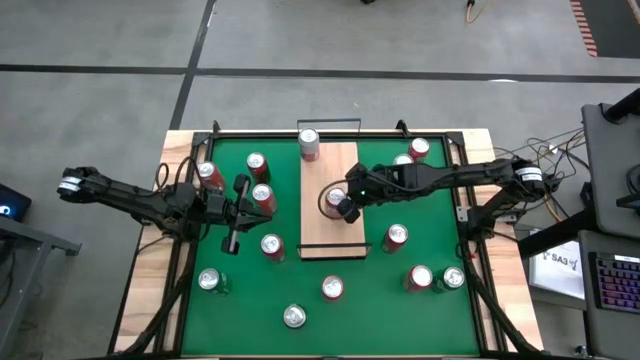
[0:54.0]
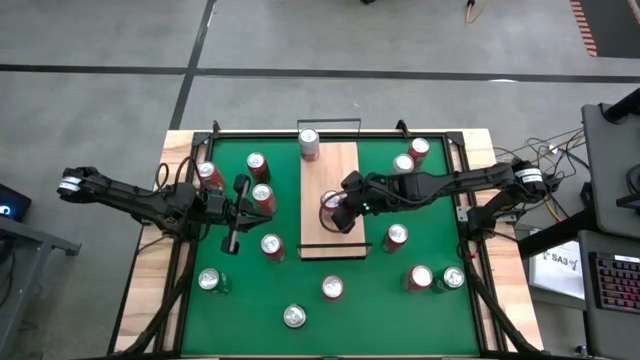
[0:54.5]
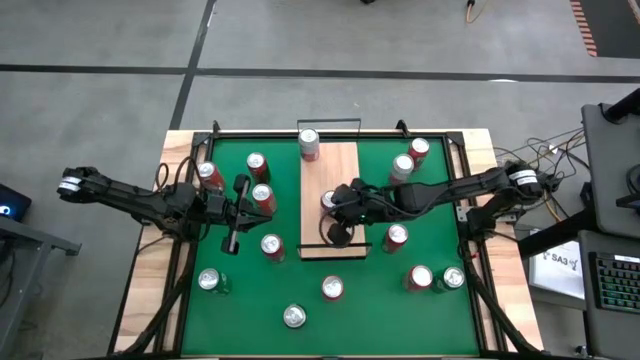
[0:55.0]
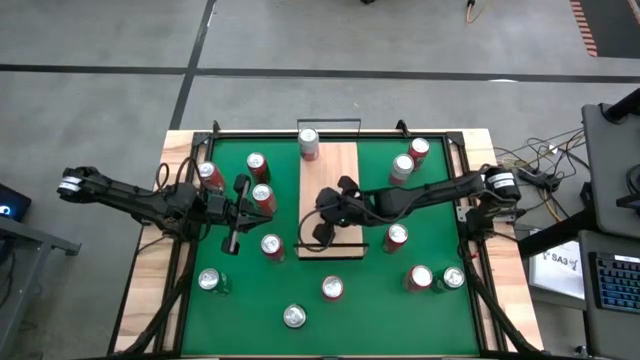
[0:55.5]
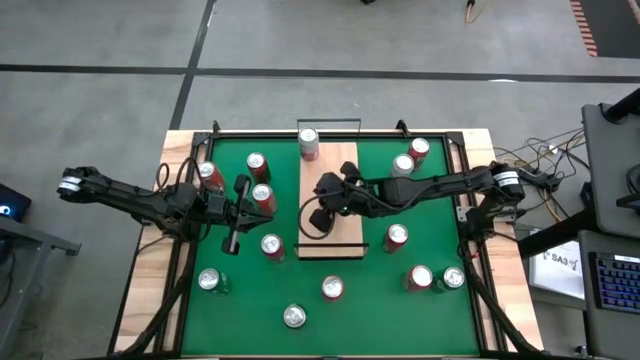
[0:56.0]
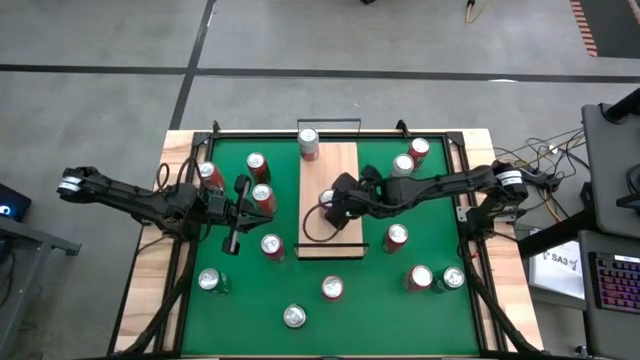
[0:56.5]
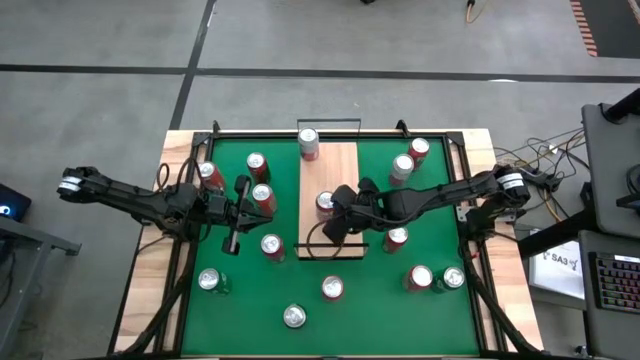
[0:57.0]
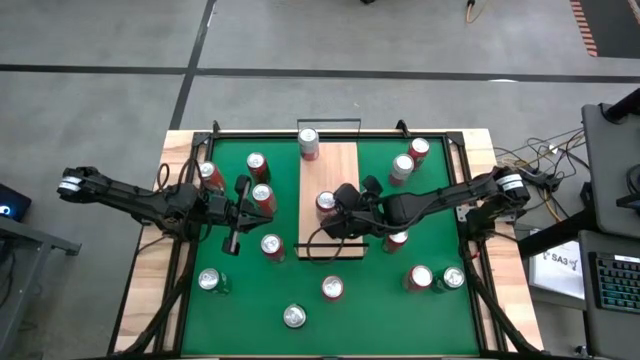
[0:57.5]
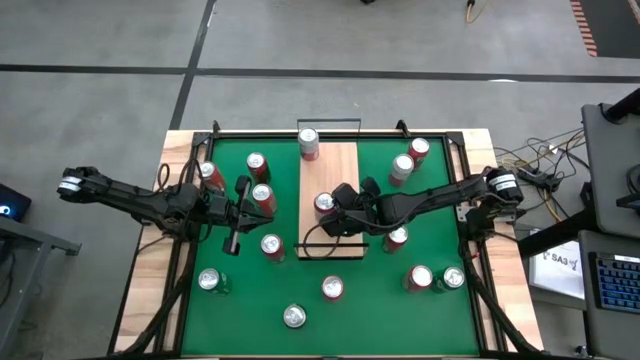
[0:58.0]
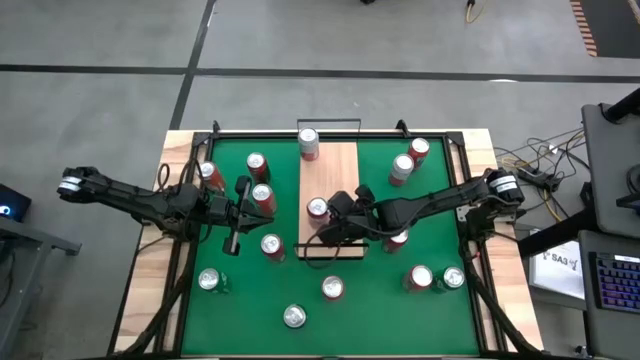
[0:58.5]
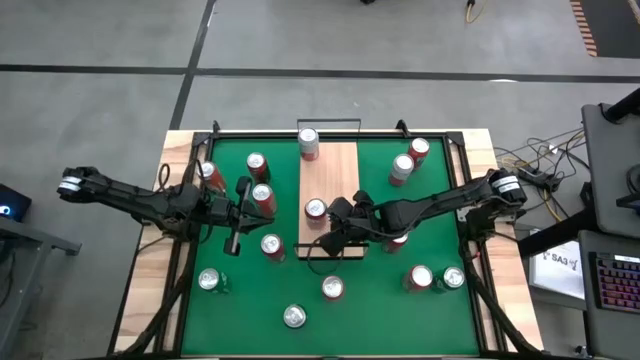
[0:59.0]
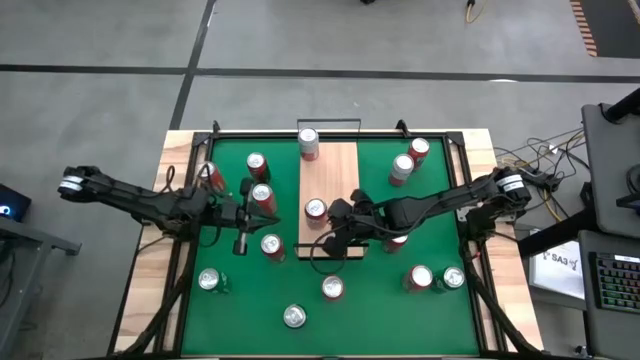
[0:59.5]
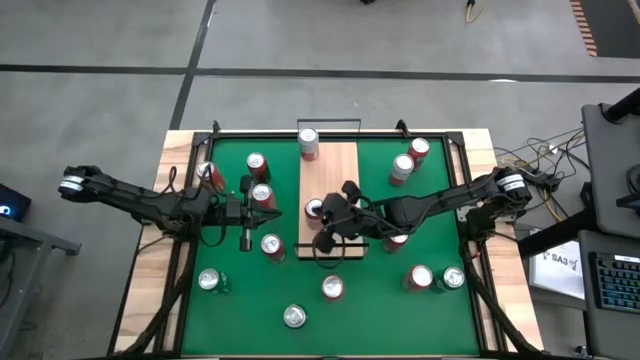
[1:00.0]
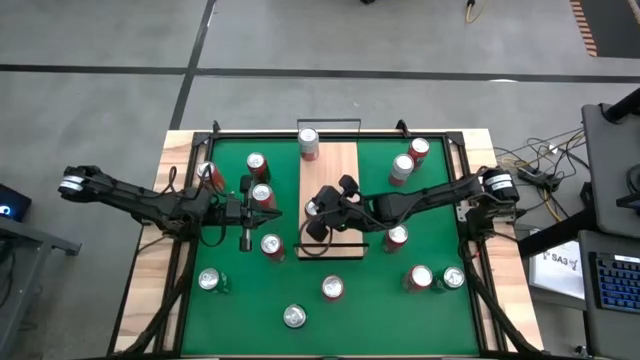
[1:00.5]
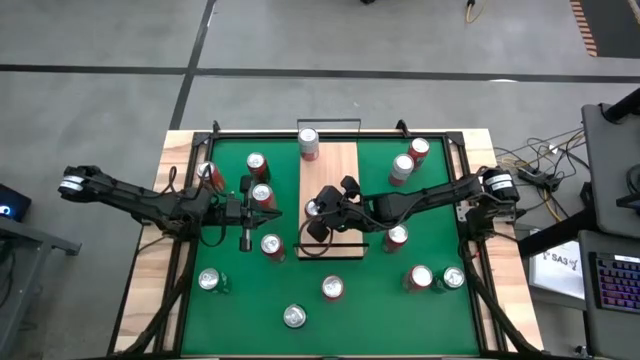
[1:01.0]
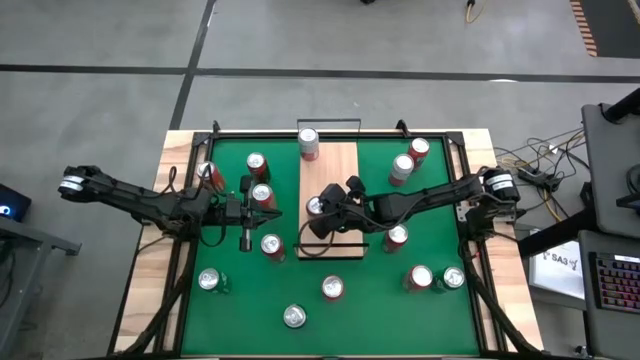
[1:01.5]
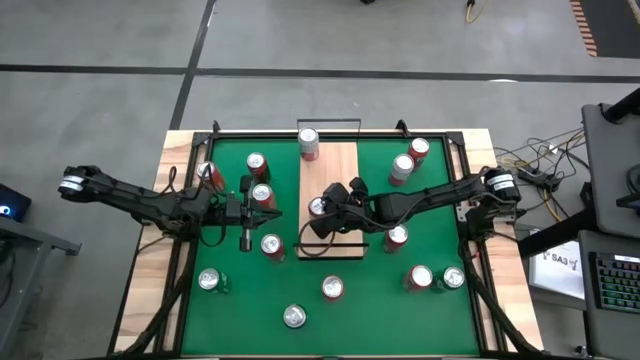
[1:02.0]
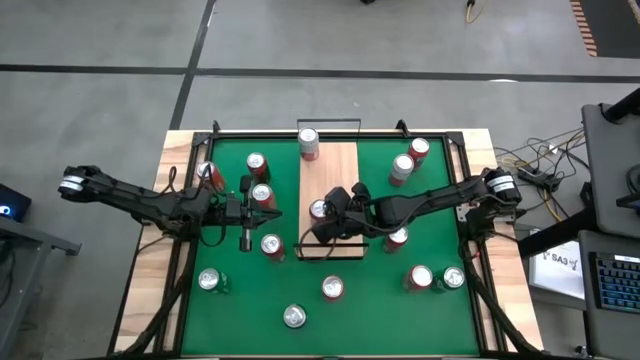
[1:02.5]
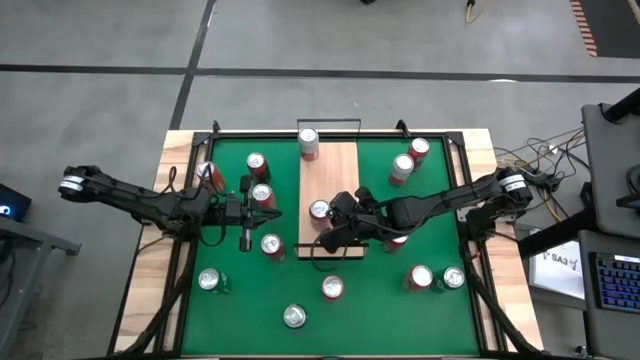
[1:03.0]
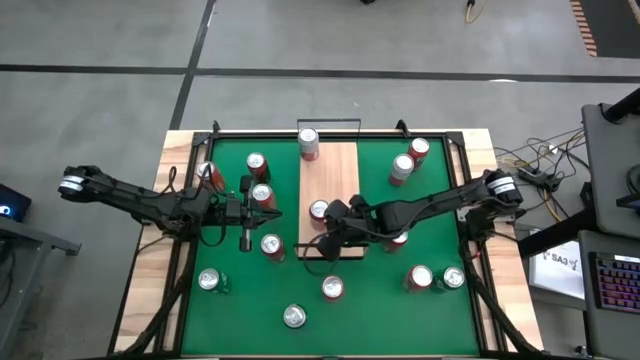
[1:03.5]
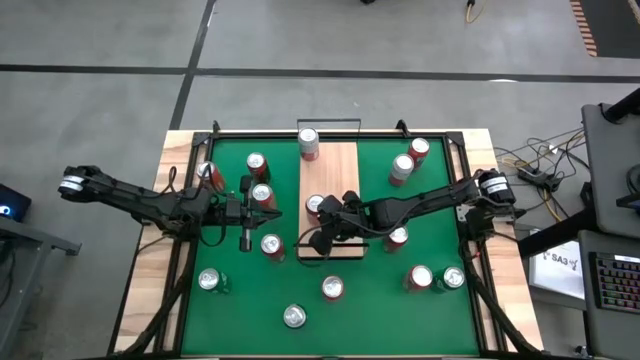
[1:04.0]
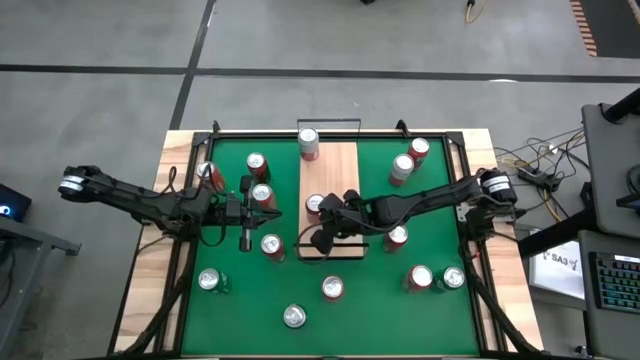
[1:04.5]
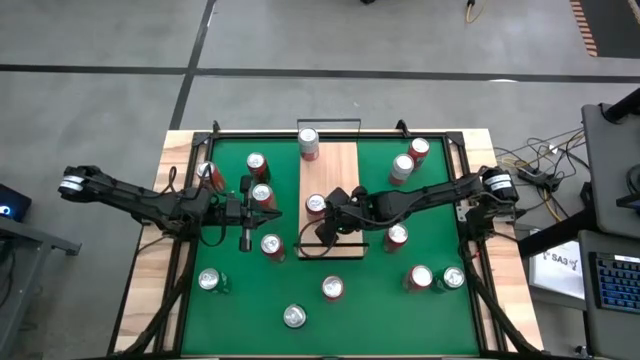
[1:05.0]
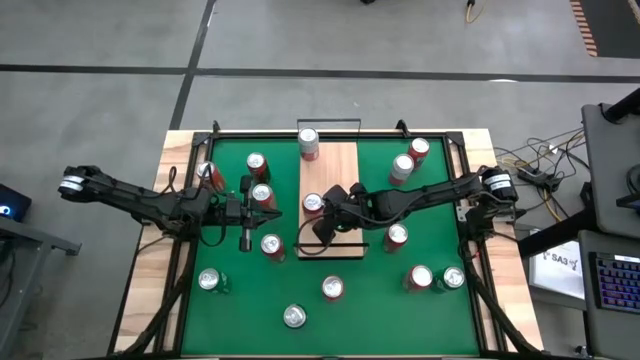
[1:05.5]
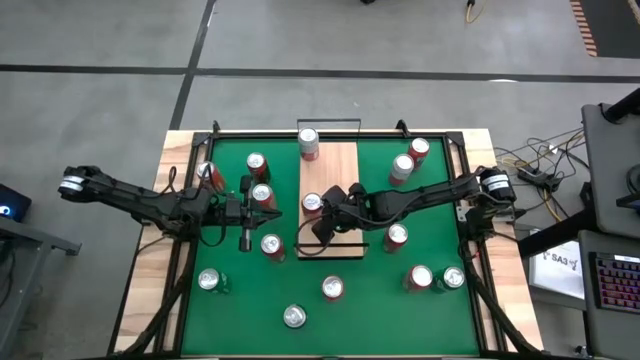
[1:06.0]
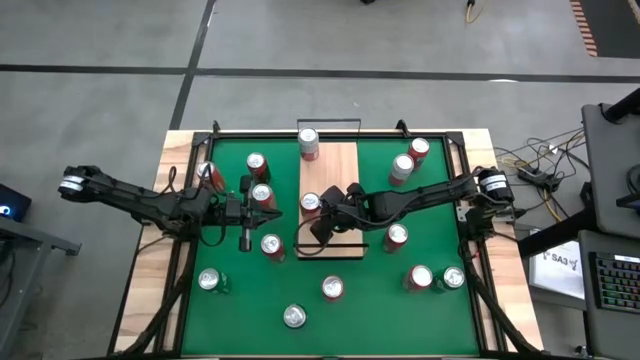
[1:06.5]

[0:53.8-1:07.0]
Task: Place canned beverage on shelf
Put the orange soda can on the shelf

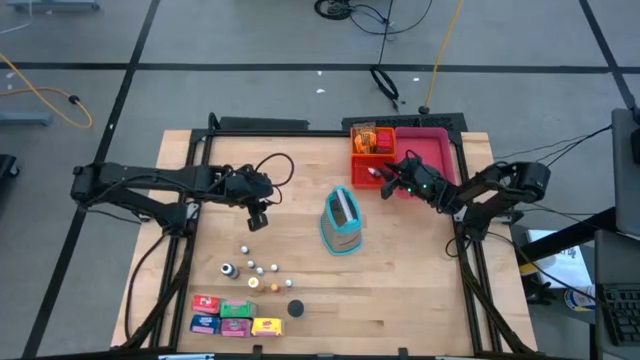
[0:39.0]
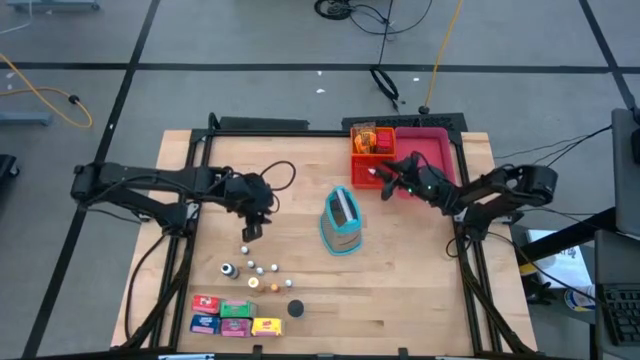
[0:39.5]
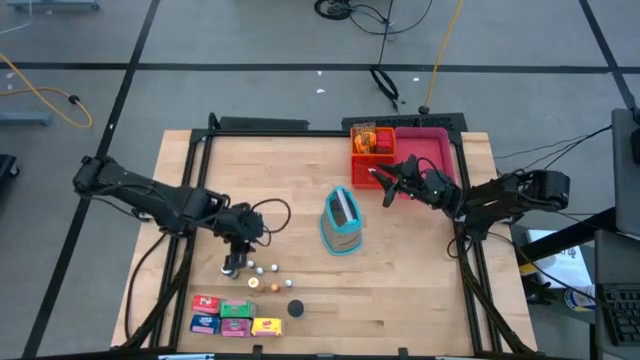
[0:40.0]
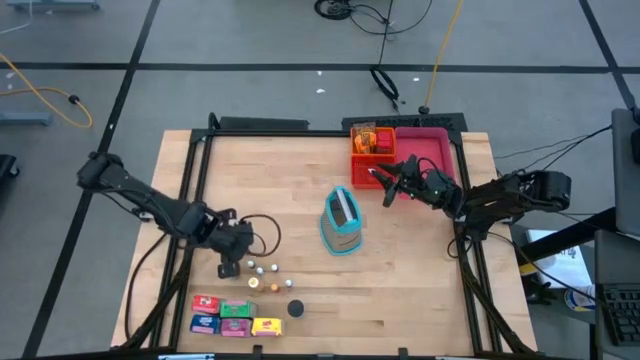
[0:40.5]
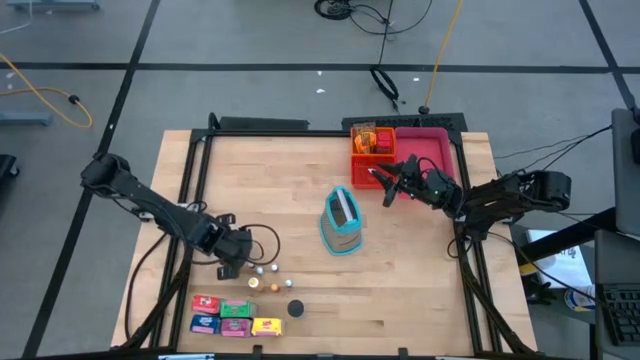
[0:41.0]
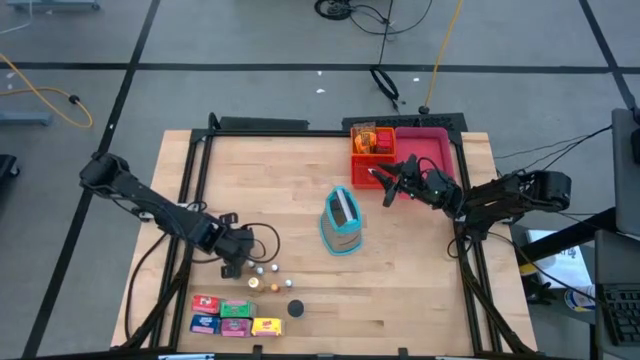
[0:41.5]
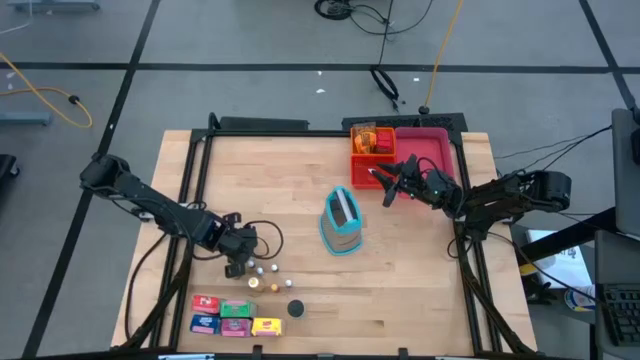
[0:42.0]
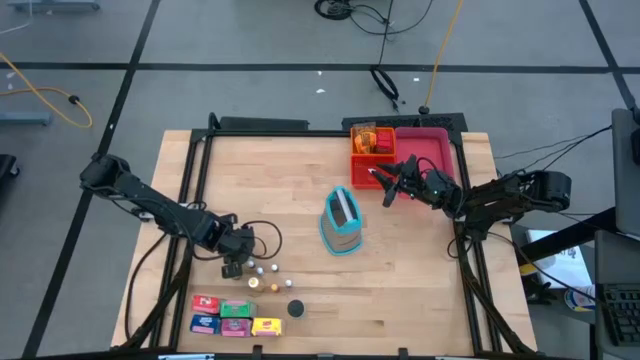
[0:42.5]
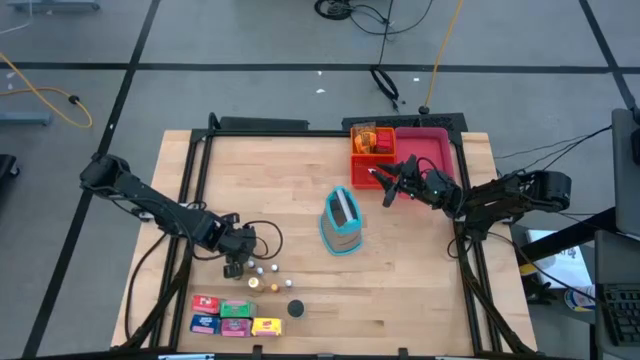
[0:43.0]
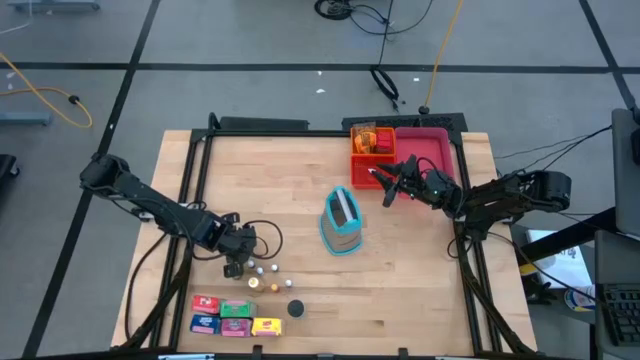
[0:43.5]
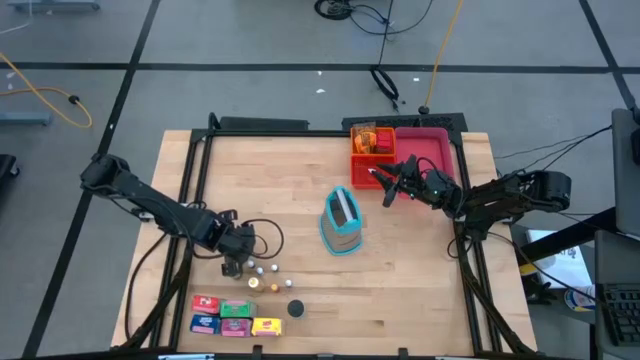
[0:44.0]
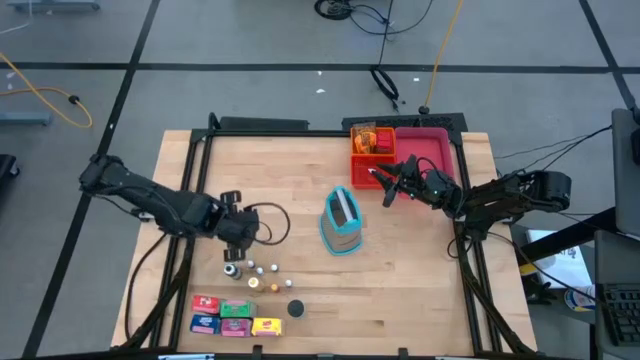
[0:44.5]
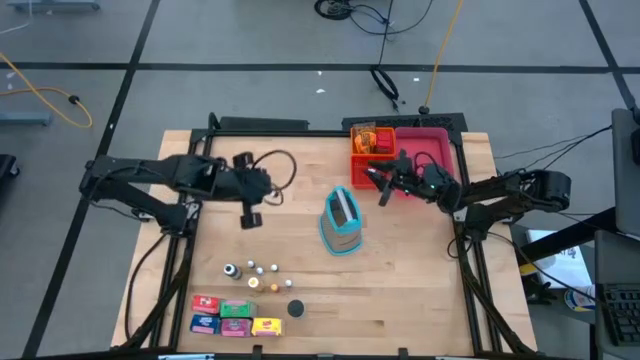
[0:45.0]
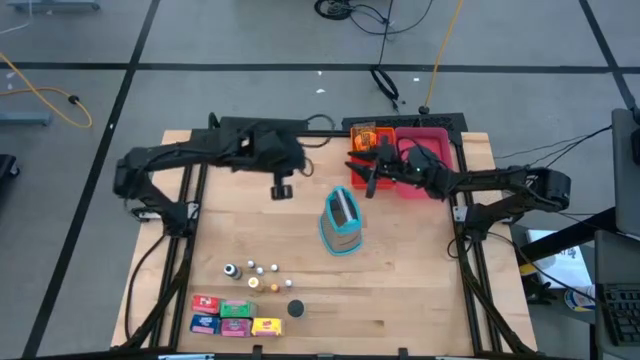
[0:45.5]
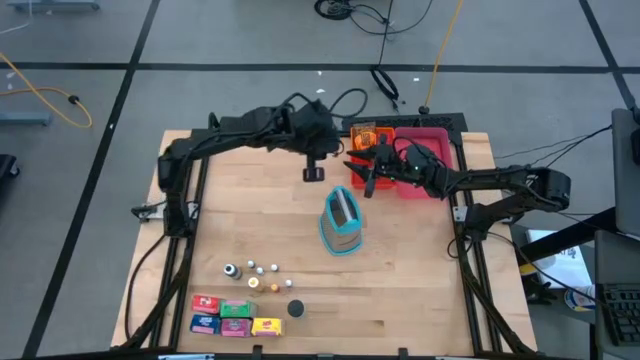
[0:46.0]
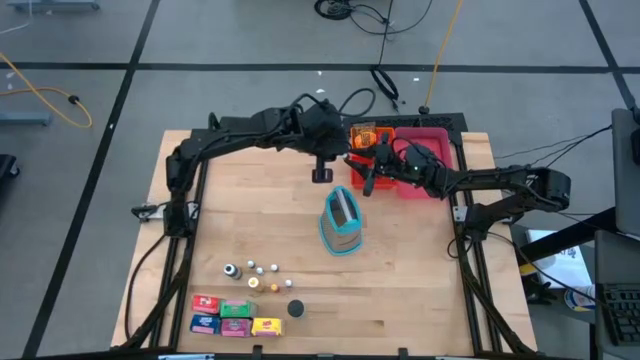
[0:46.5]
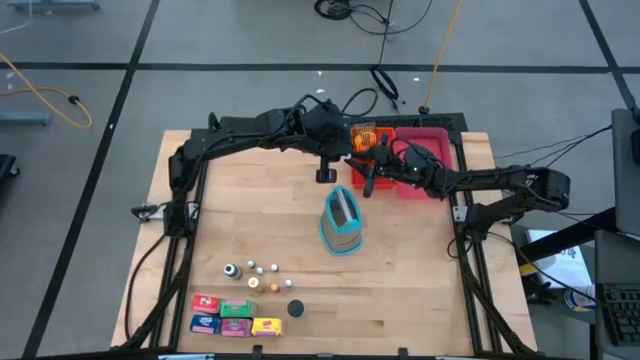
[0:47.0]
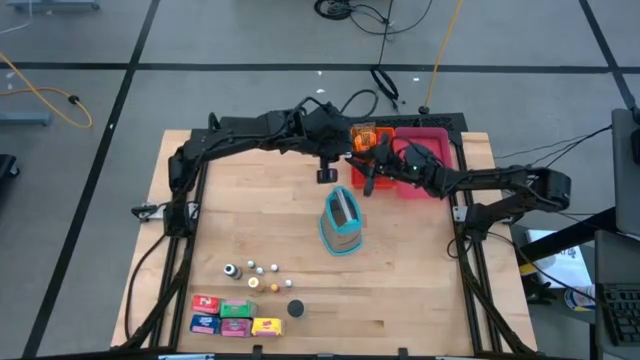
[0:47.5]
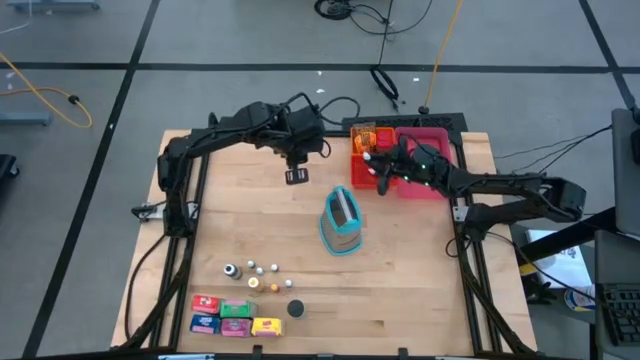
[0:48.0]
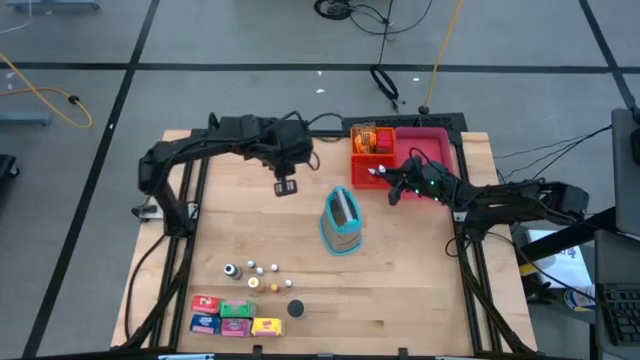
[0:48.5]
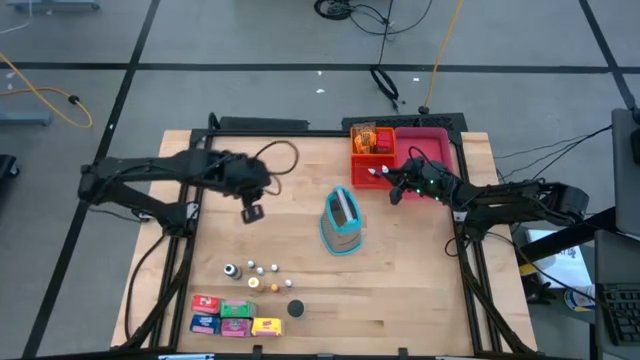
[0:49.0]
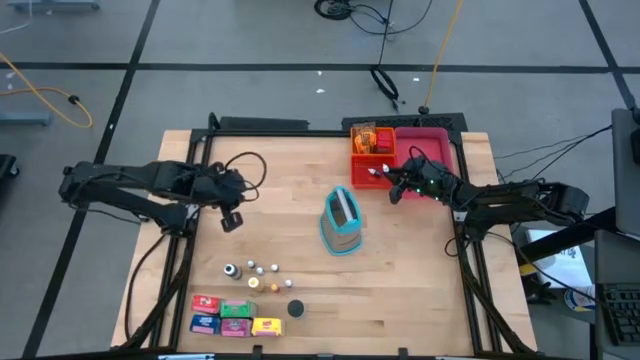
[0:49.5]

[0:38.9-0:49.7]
Task: Pick & Place Kitchen Items
Put the small top brown food coloring bottle into the red bin
